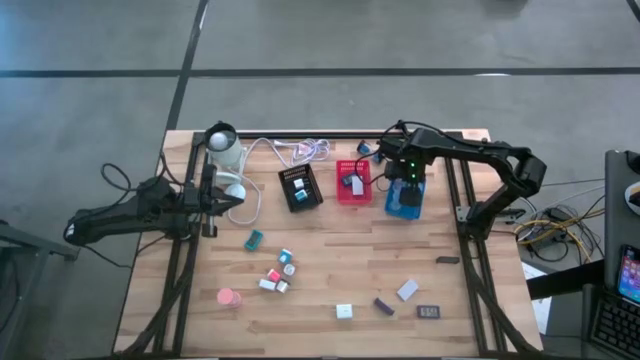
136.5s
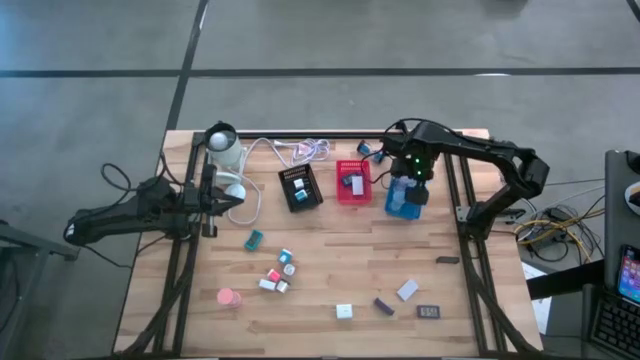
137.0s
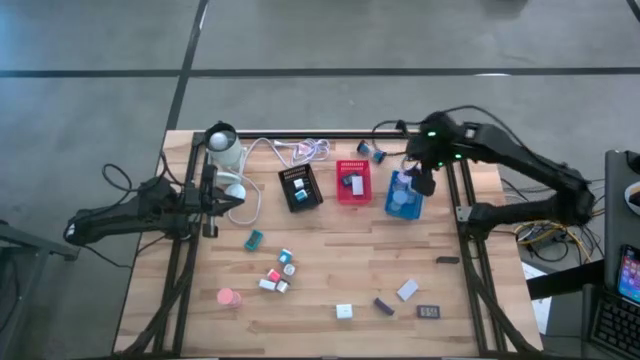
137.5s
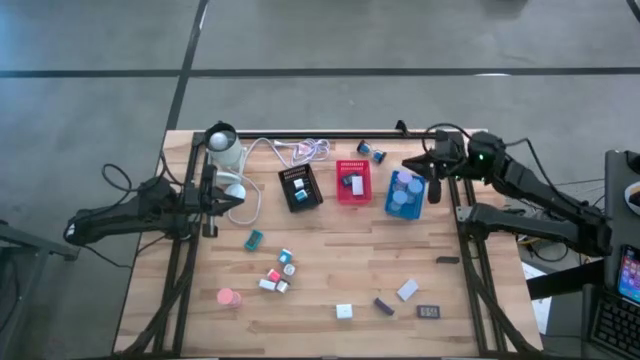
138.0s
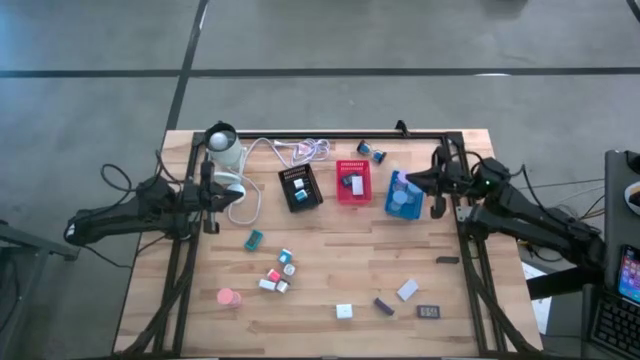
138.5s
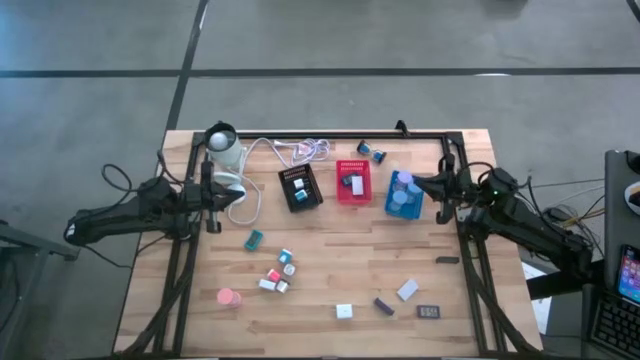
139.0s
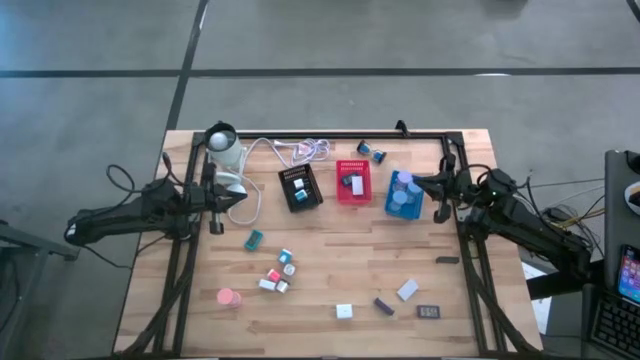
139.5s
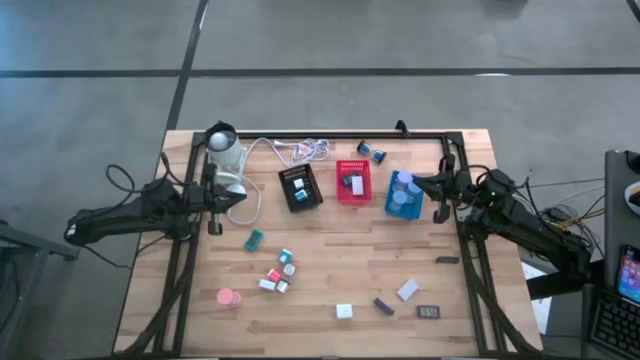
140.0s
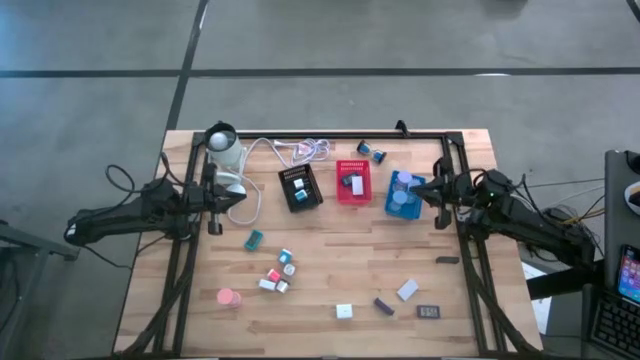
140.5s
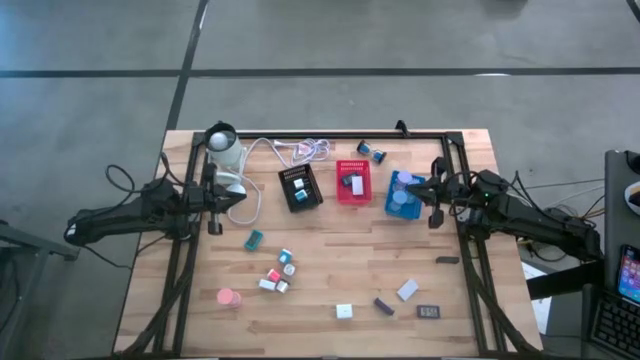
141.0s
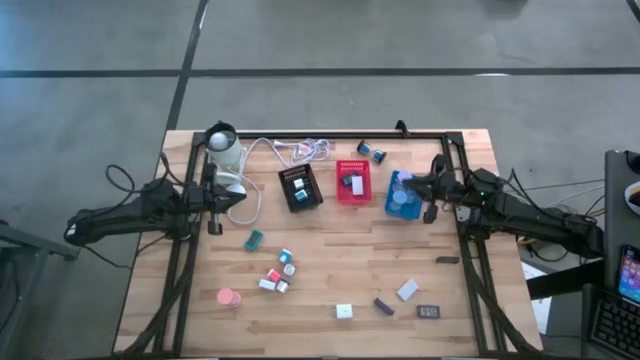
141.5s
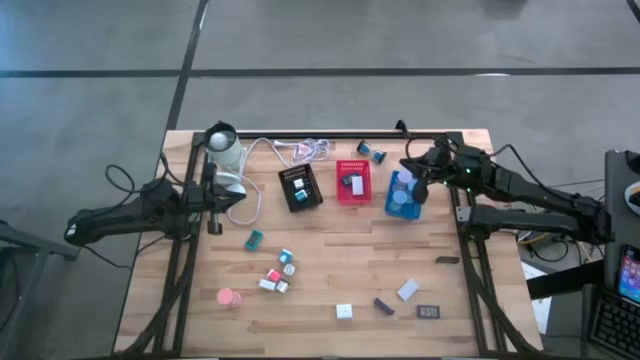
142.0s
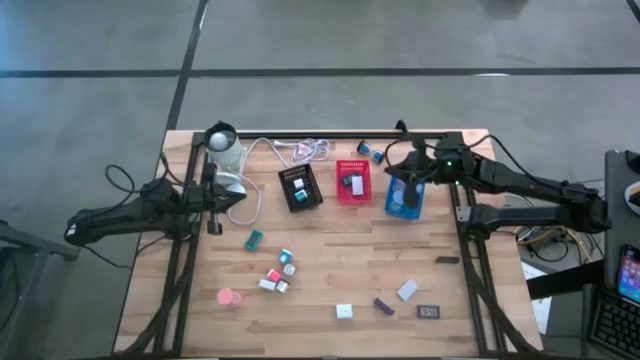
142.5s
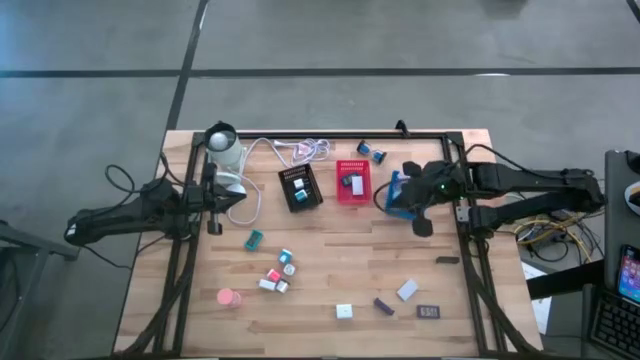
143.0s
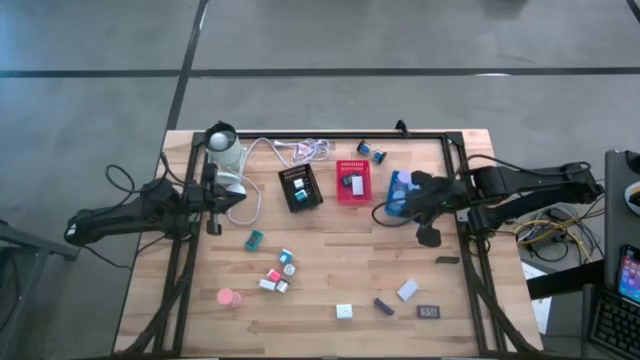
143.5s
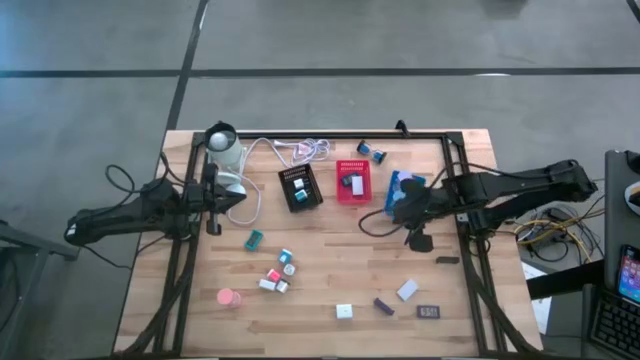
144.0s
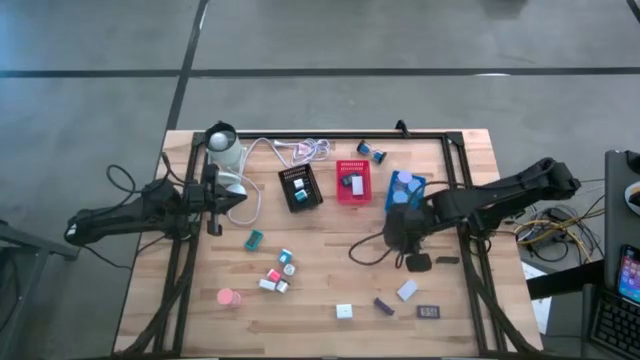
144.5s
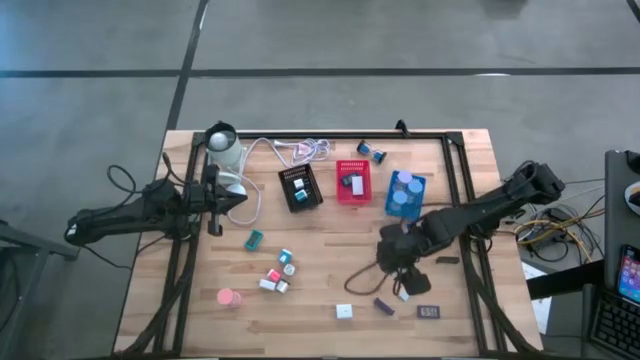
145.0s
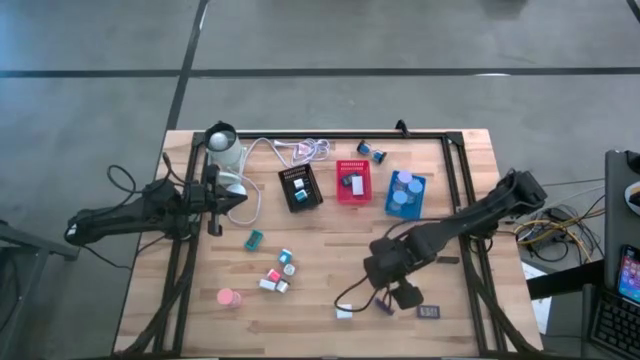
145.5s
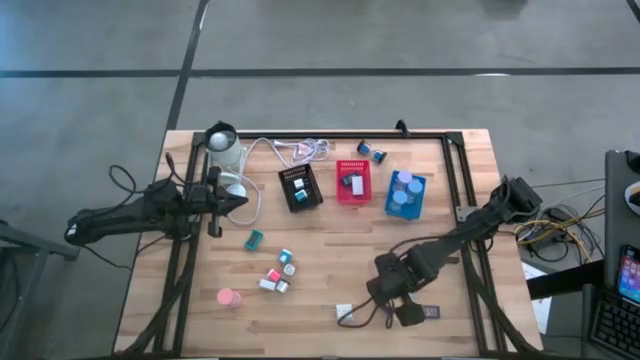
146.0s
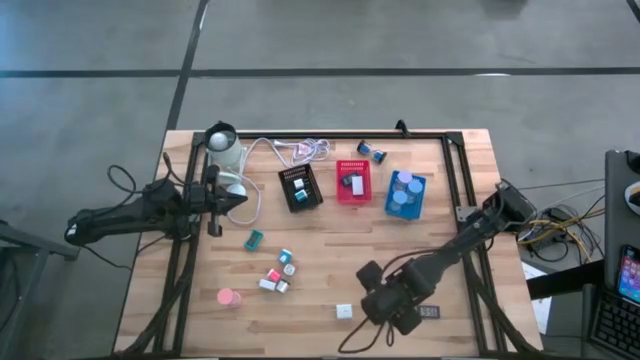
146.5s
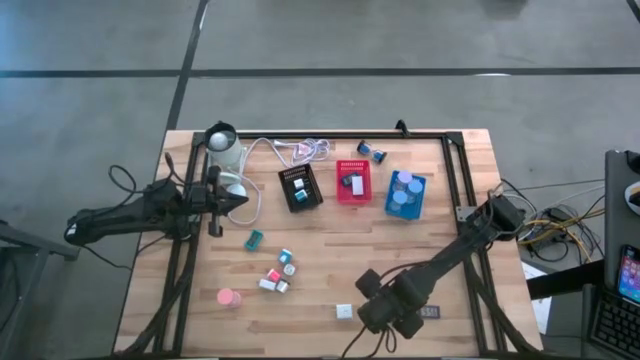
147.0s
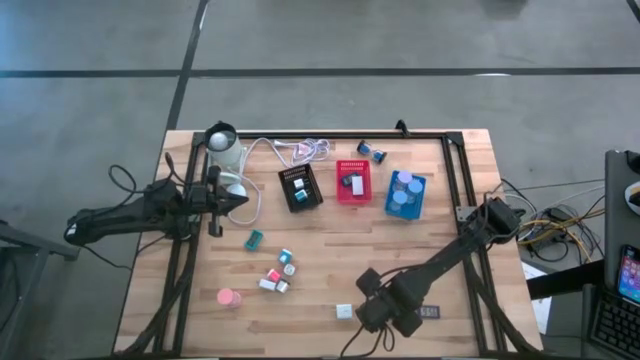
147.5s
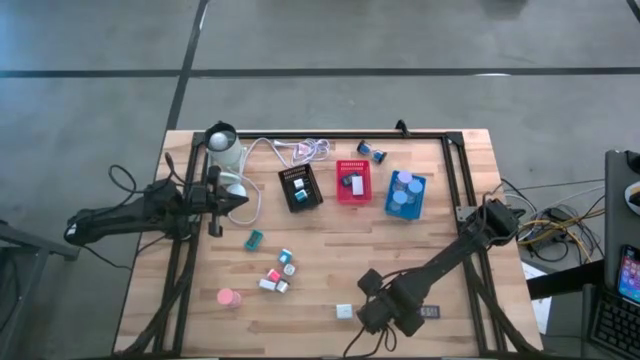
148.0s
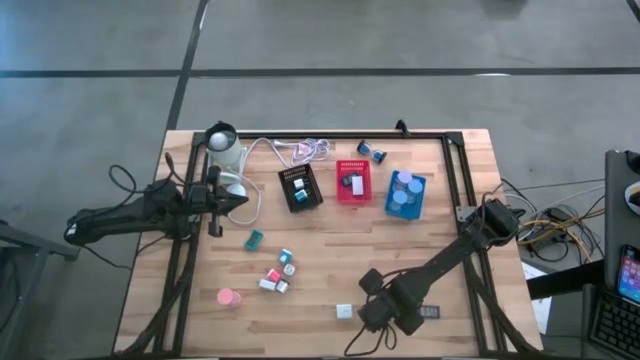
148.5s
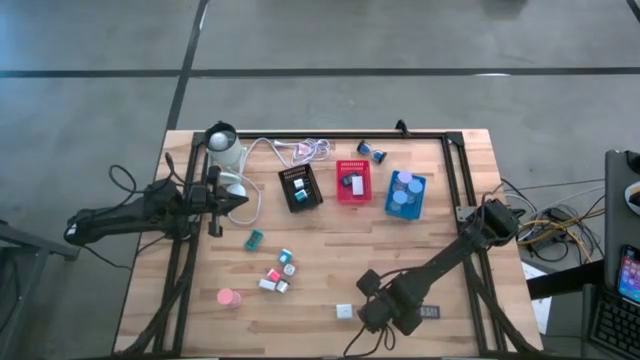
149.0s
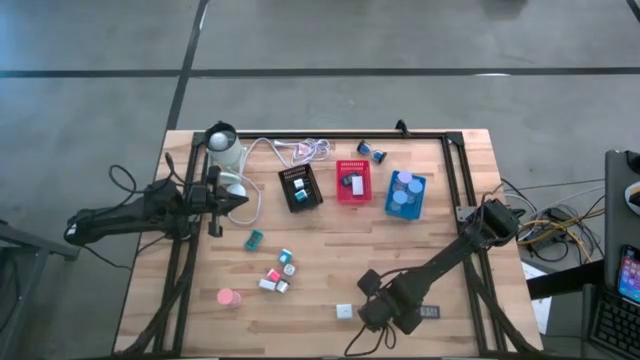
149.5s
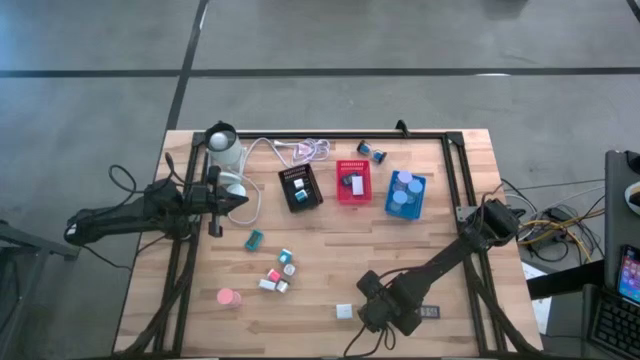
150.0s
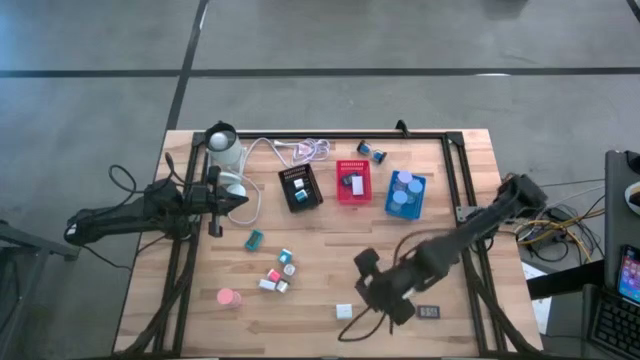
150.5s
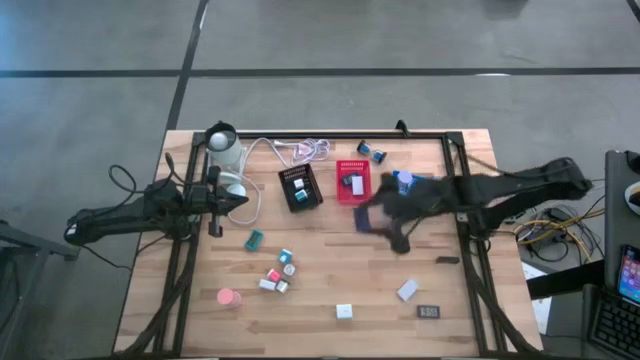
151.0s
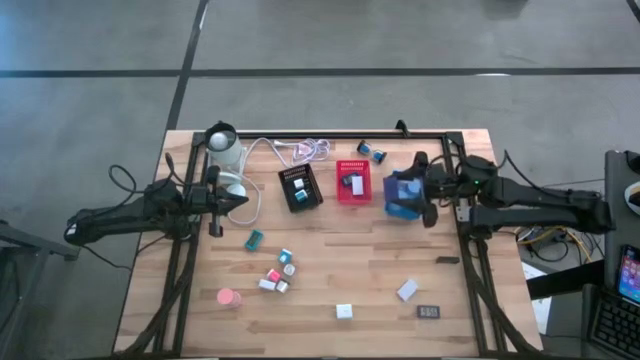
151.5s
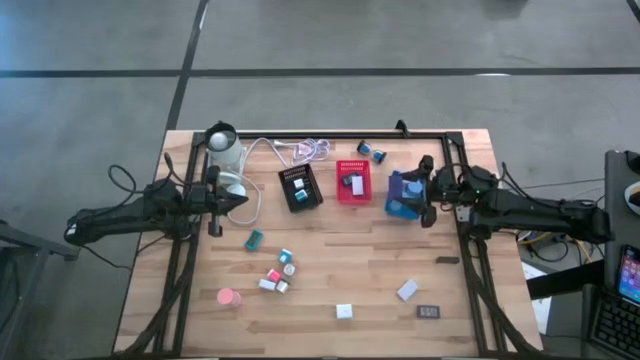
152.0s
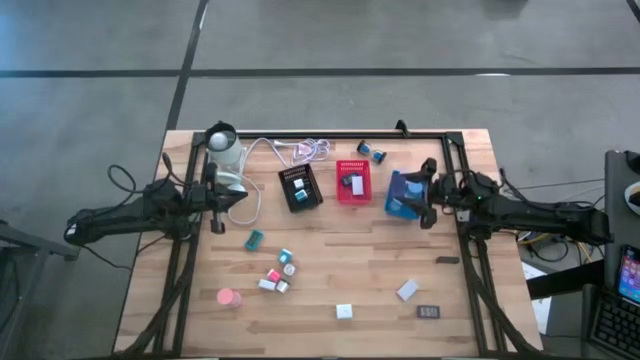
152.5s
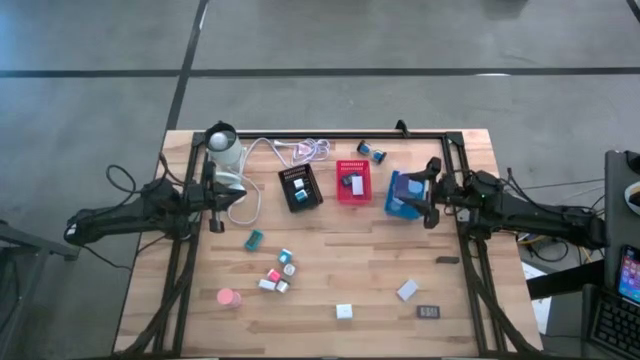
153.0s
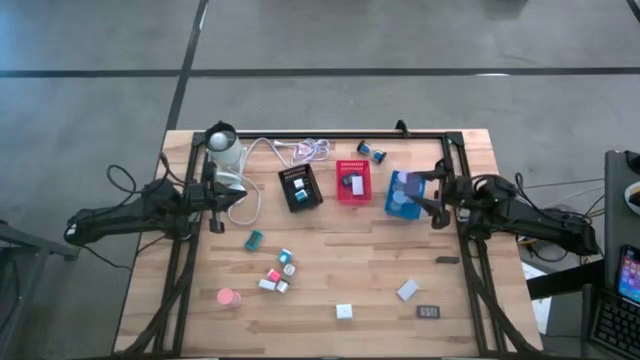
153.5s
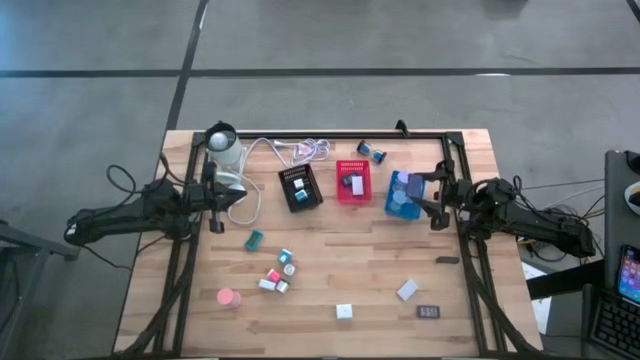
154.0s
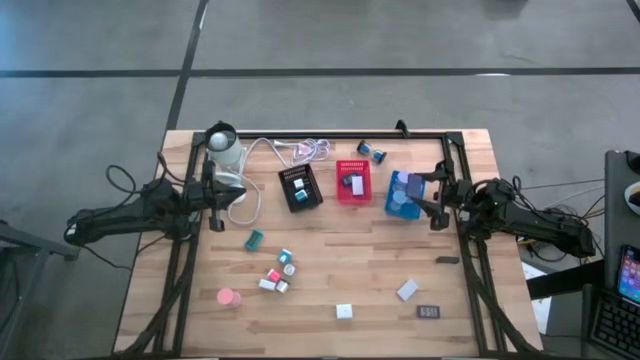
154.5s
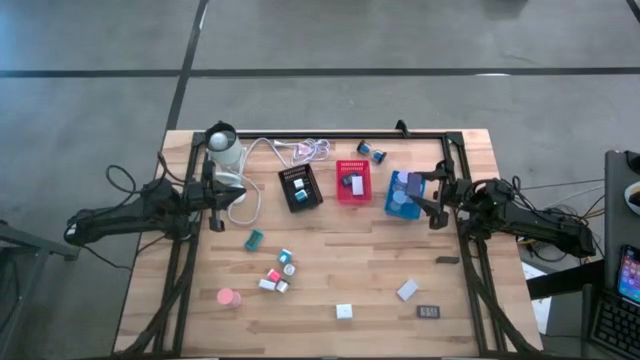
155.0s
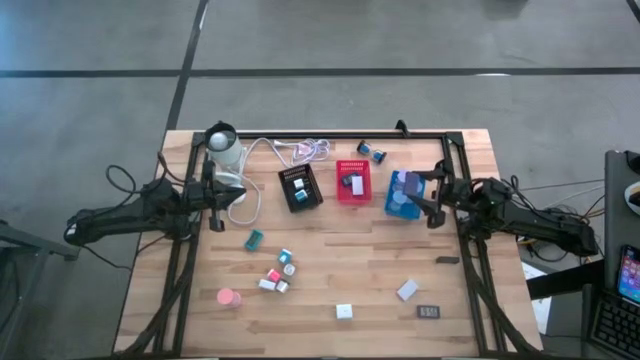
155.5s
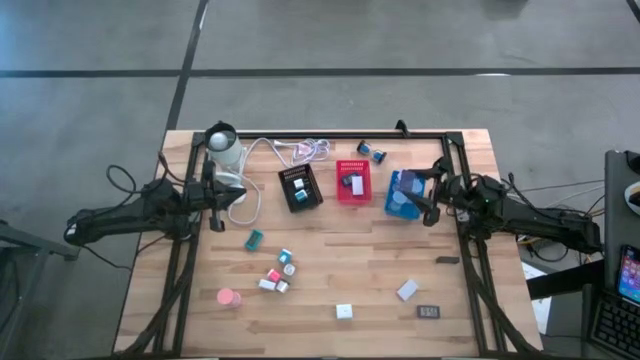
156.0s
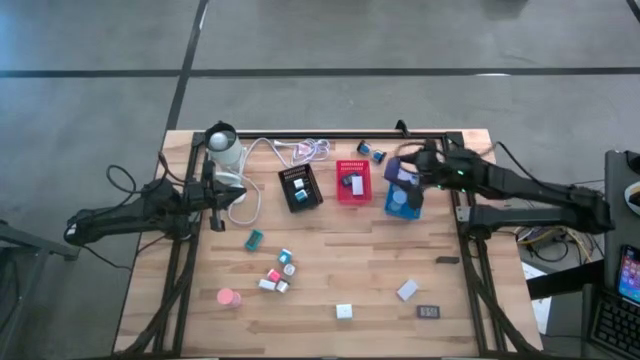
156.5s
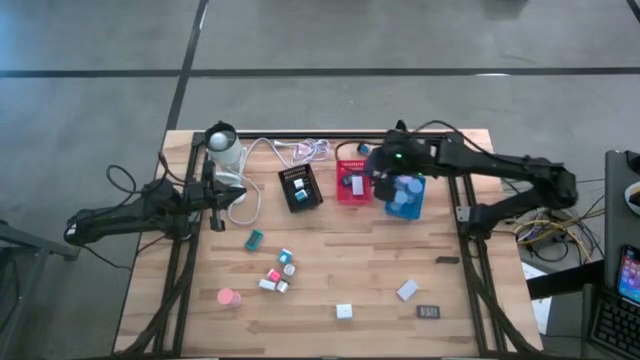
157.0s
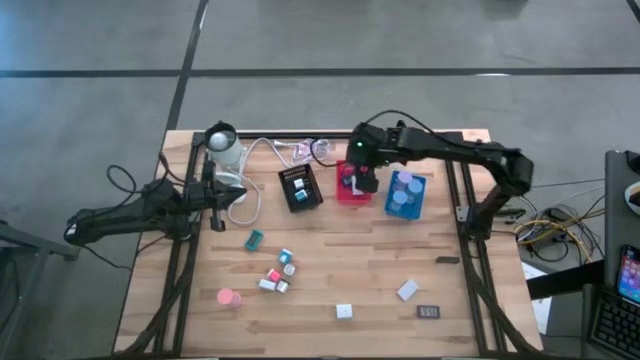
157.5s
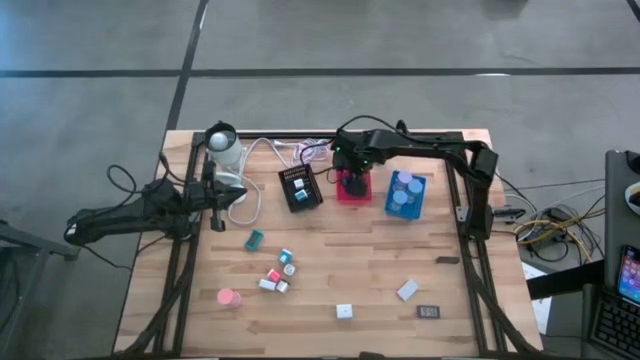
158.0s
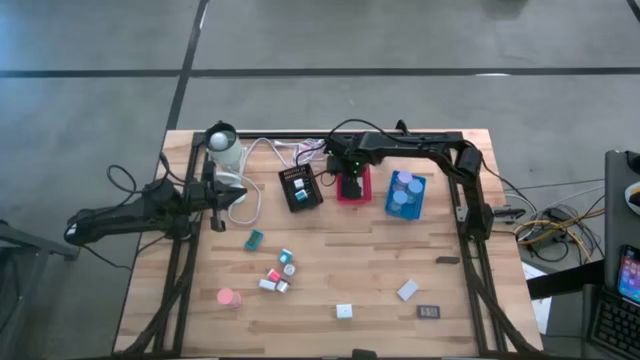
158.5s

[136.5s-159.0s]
Task: Pick & Place Office items
Put the left violet digital clock into the red bin
